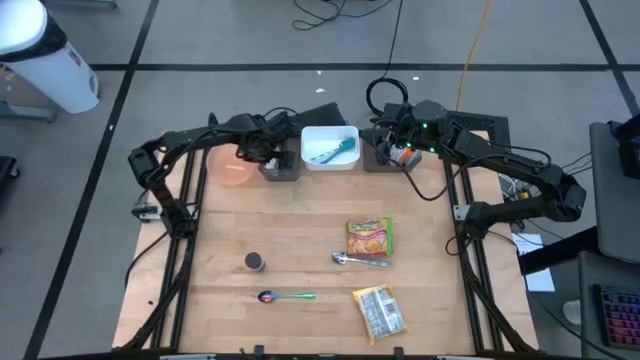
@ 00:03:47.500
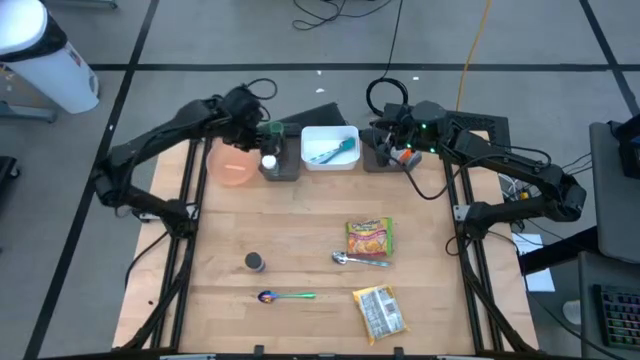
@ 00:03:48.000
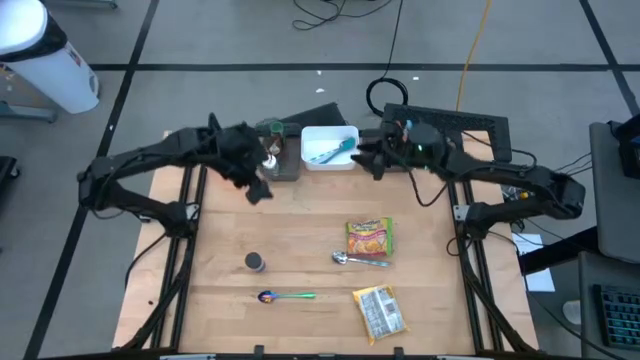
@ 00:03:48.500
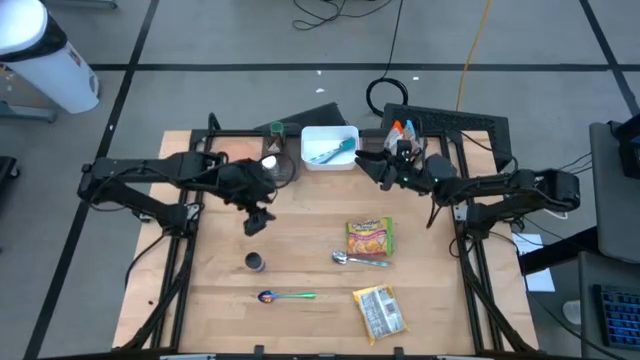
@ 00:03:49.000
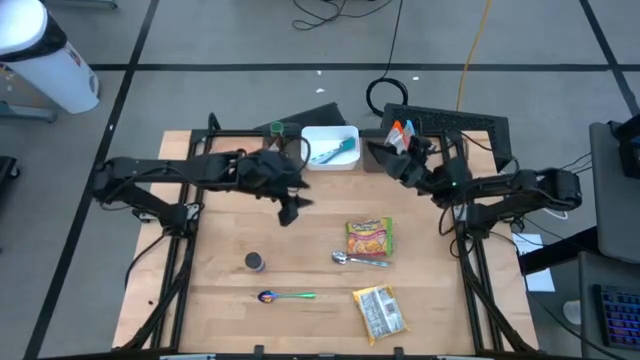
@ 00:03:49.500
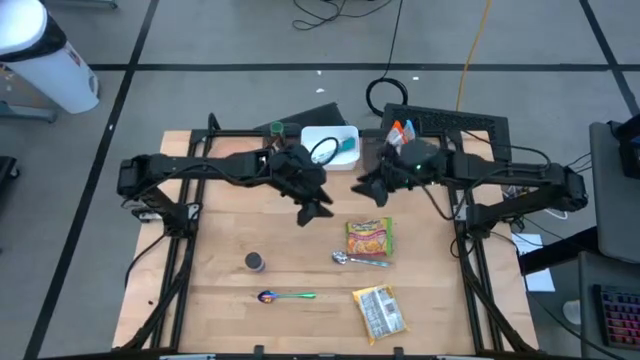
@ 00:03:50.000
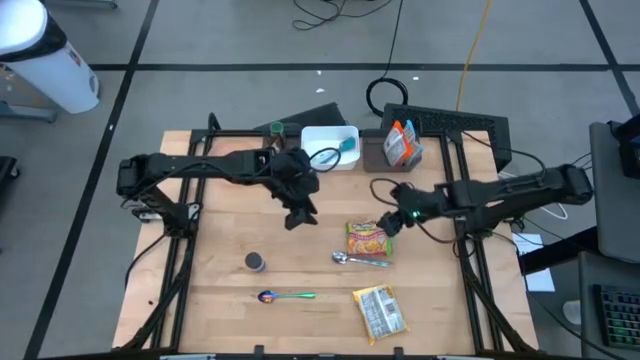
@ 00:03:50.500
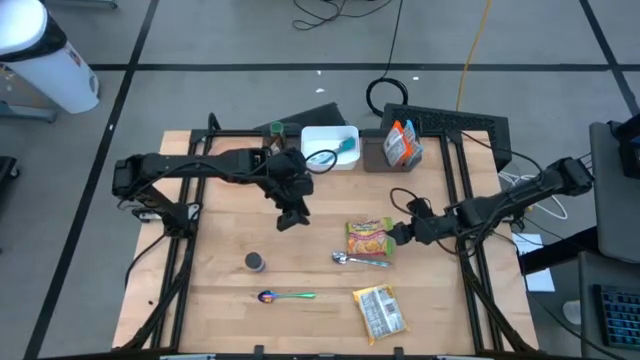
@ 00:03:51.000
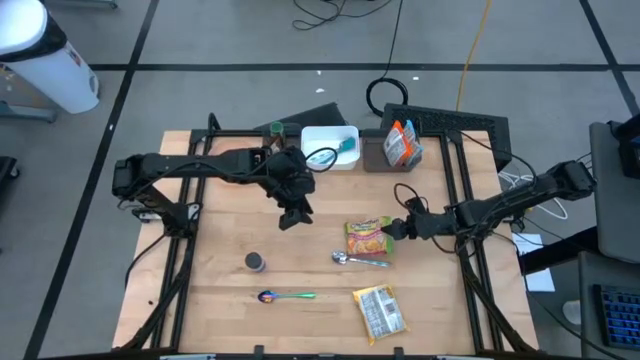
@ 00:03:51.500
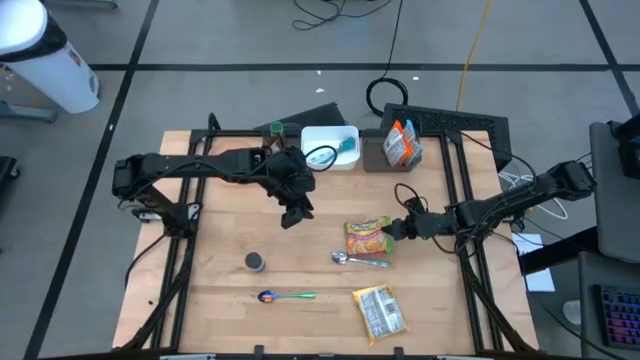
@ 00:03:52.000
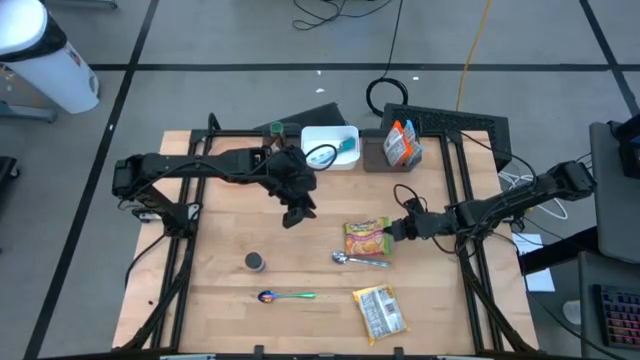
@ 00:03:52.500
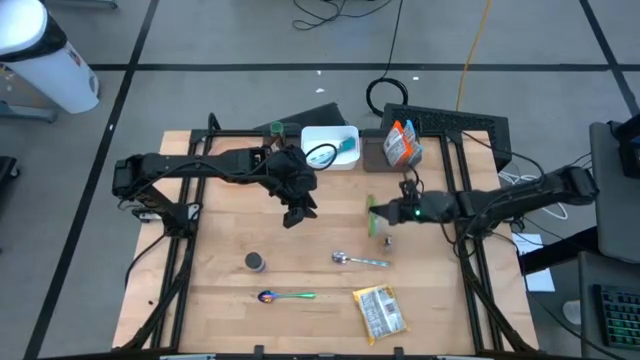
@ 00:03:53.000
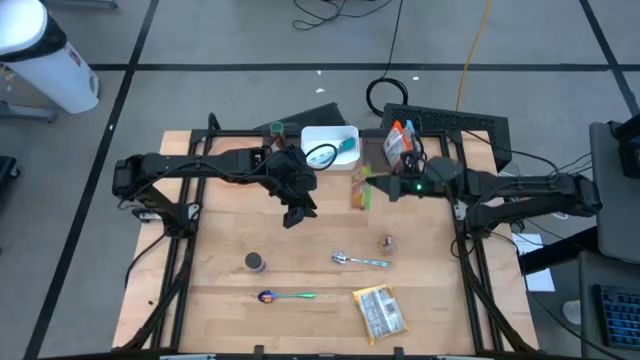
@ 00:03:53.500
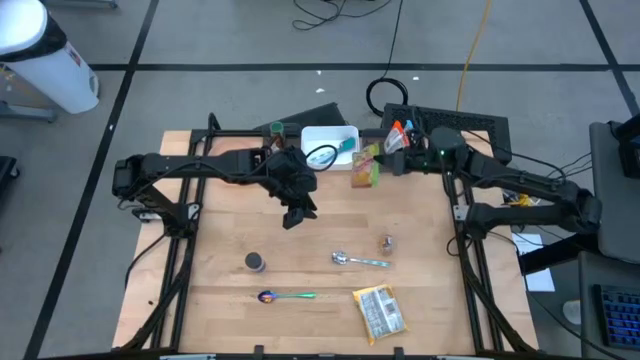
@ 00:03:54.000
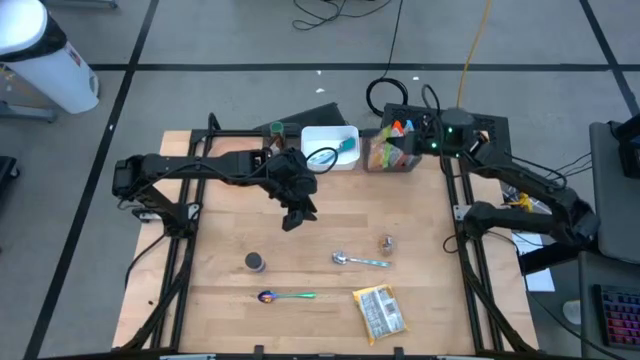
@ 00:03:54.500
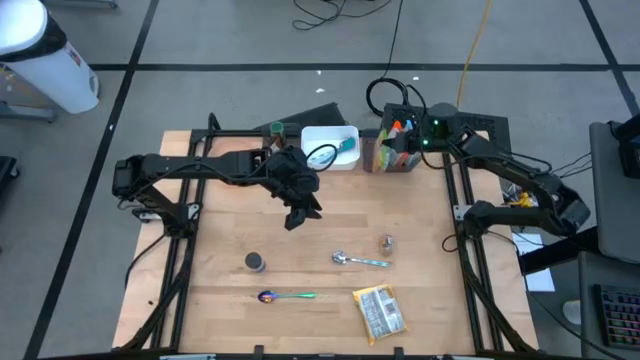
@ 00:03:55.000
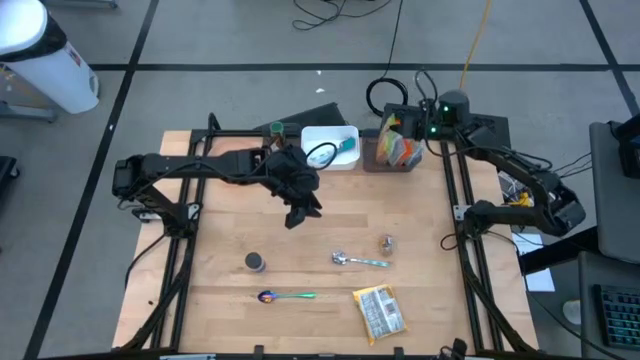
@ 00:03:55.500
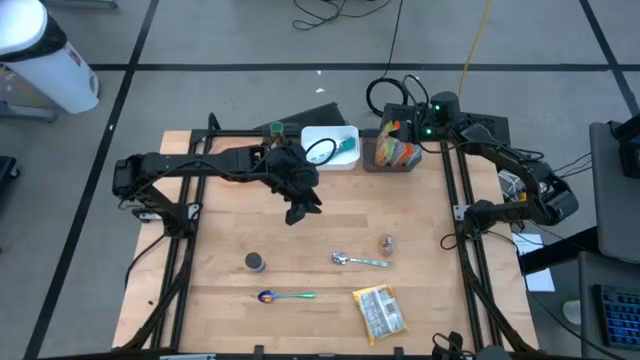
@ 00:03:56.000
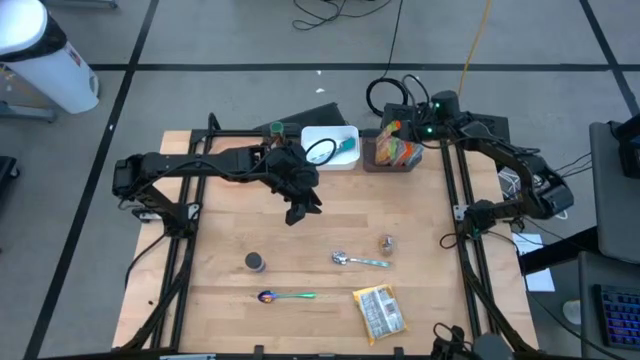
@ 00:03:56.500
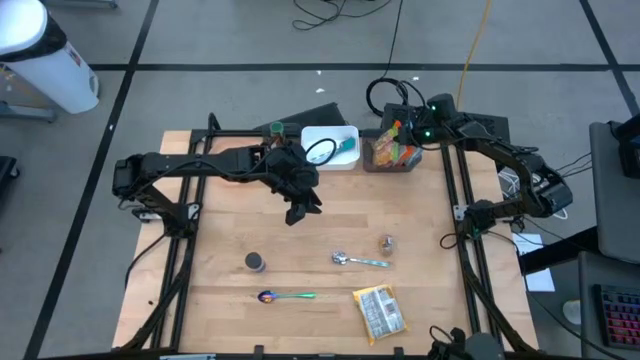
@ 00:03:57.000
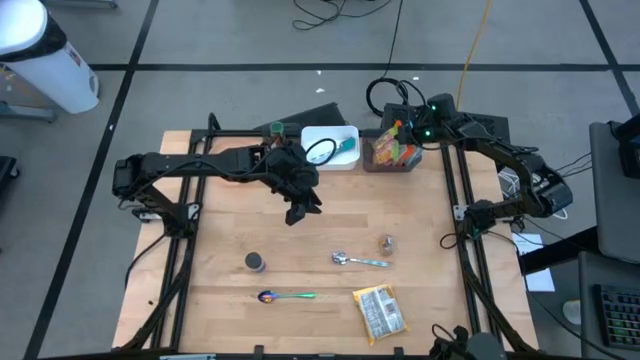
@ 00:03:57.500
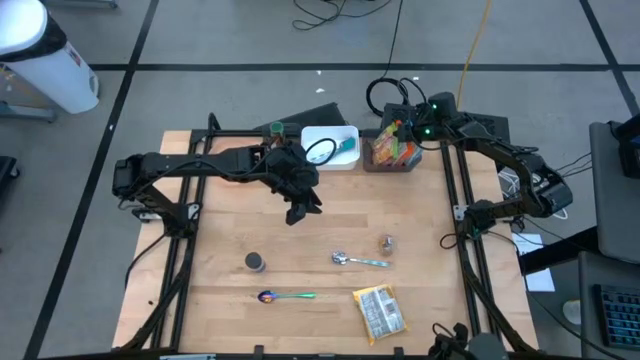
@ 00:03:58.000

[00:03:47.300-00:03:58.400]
Task: Pick & Place Food Item
Put the green noodle pack into the right black bin

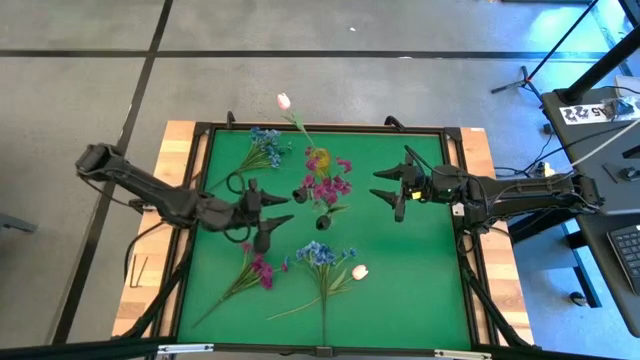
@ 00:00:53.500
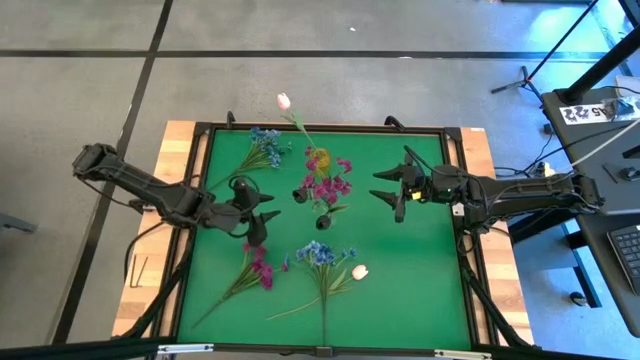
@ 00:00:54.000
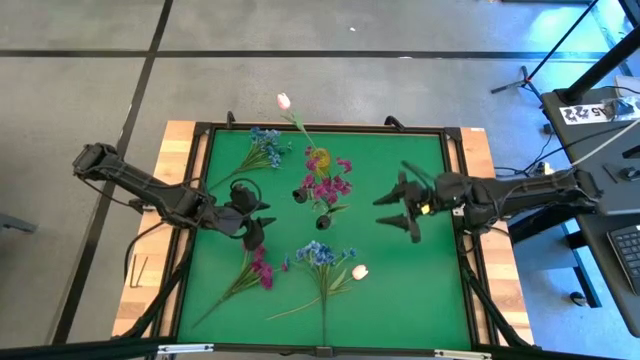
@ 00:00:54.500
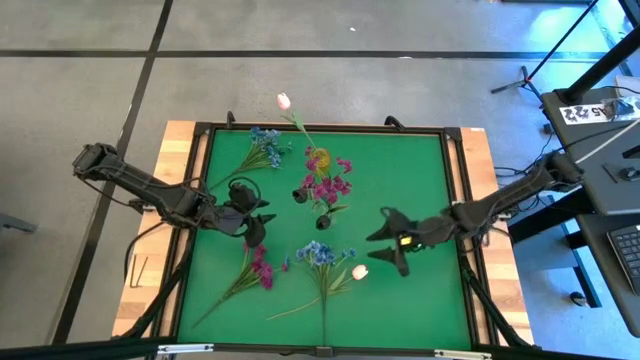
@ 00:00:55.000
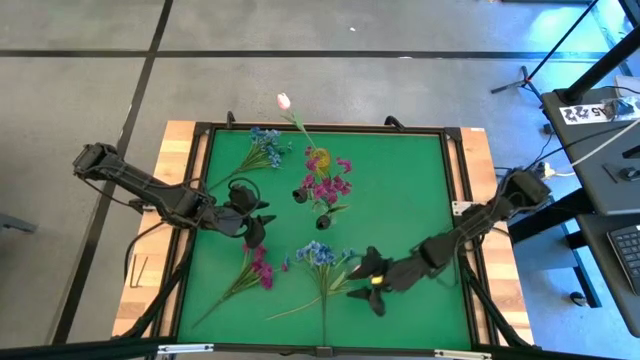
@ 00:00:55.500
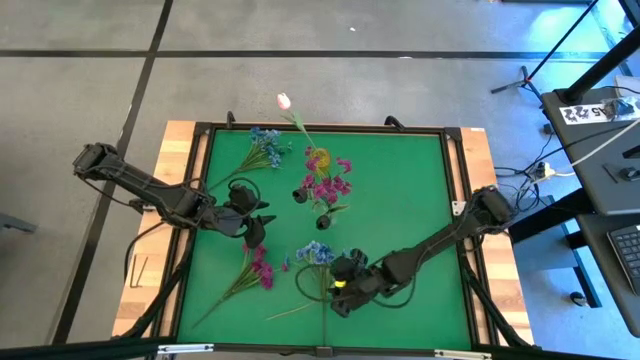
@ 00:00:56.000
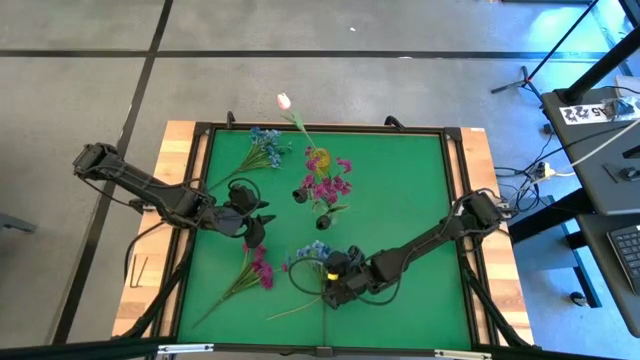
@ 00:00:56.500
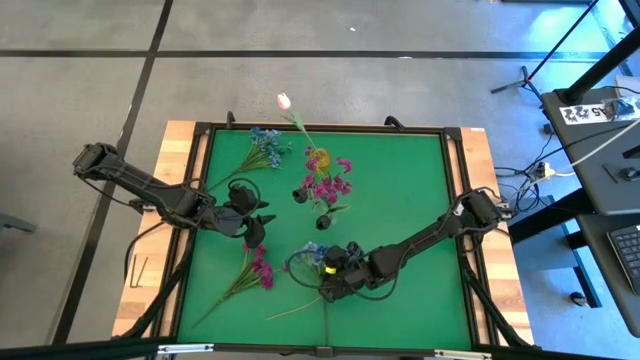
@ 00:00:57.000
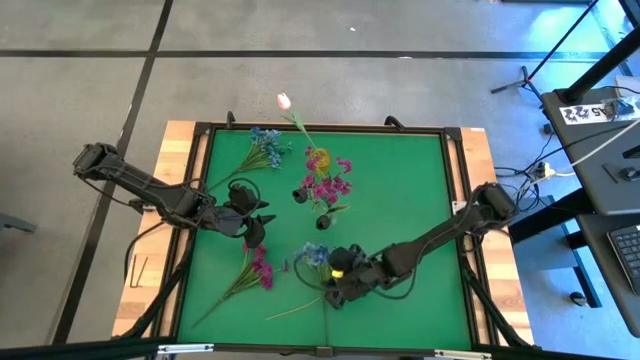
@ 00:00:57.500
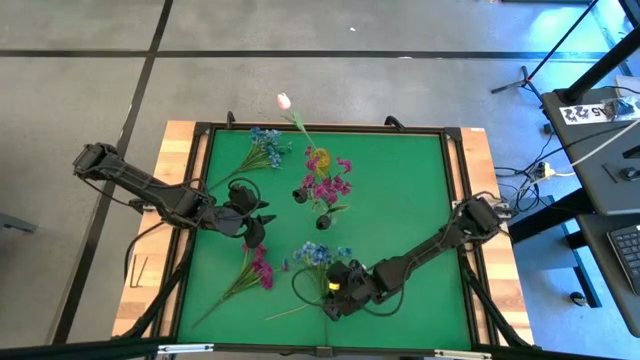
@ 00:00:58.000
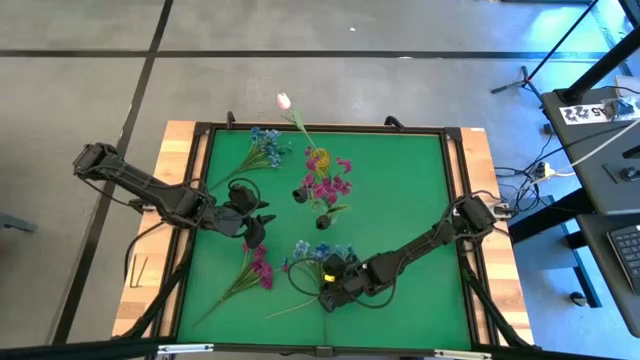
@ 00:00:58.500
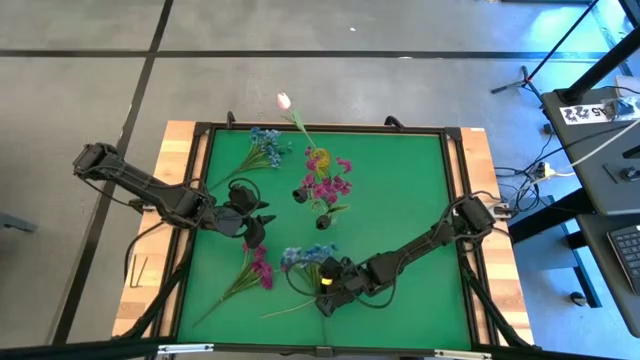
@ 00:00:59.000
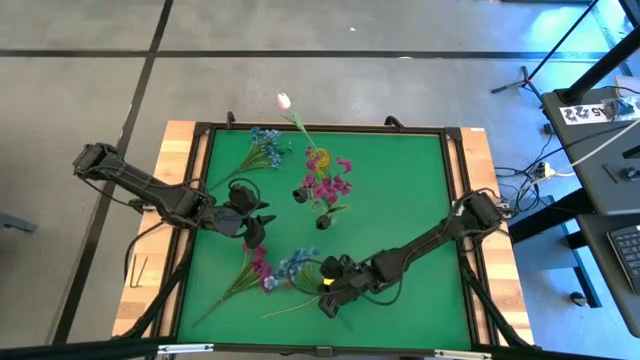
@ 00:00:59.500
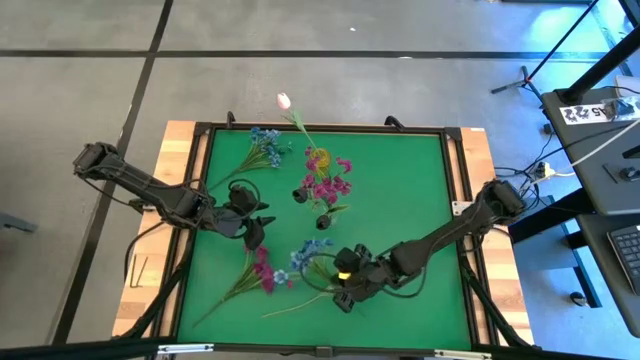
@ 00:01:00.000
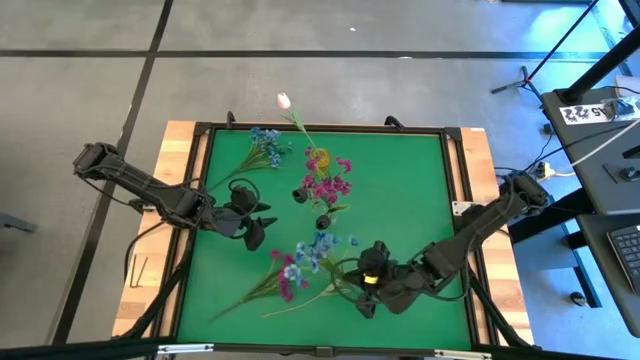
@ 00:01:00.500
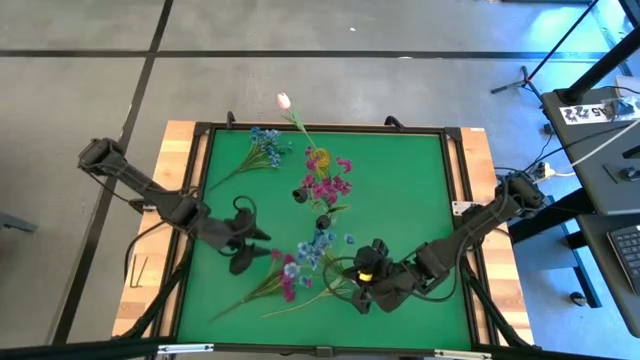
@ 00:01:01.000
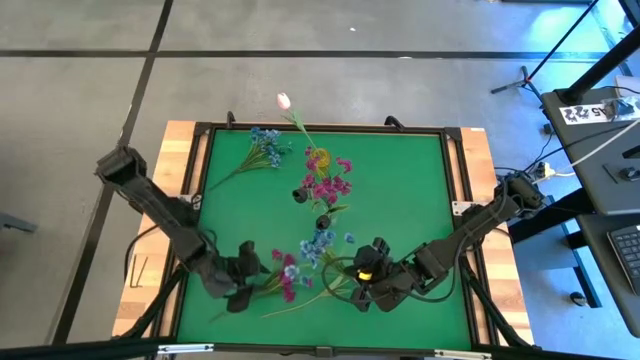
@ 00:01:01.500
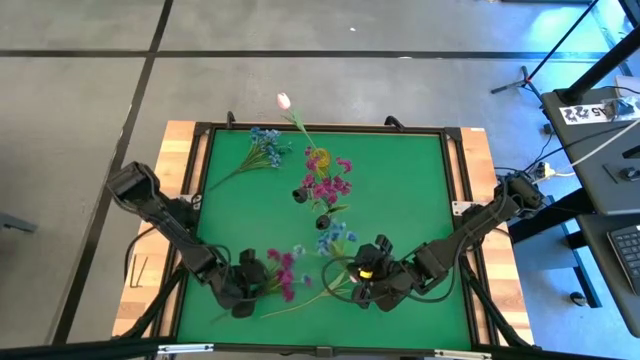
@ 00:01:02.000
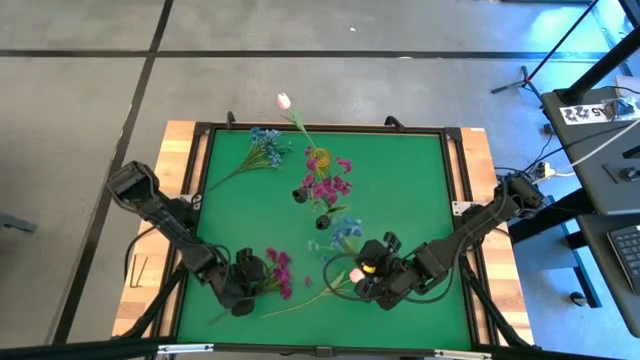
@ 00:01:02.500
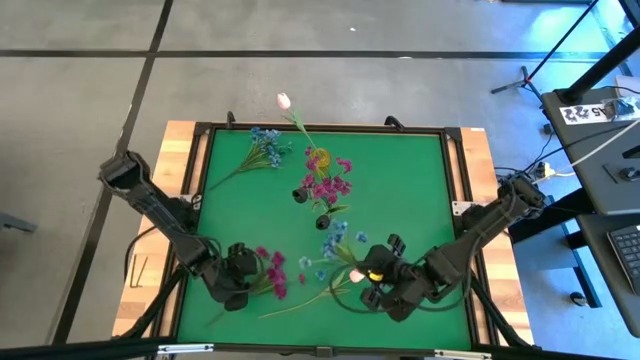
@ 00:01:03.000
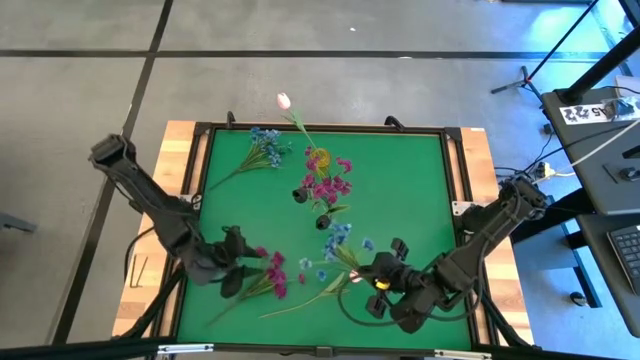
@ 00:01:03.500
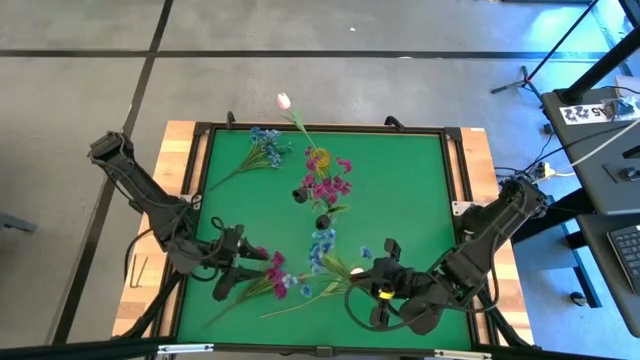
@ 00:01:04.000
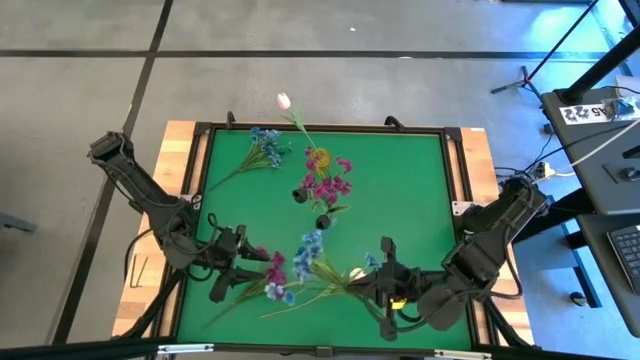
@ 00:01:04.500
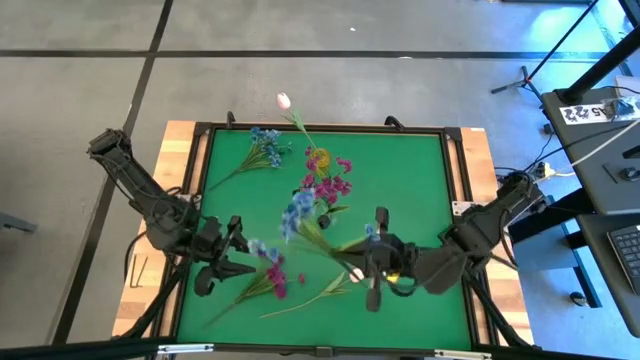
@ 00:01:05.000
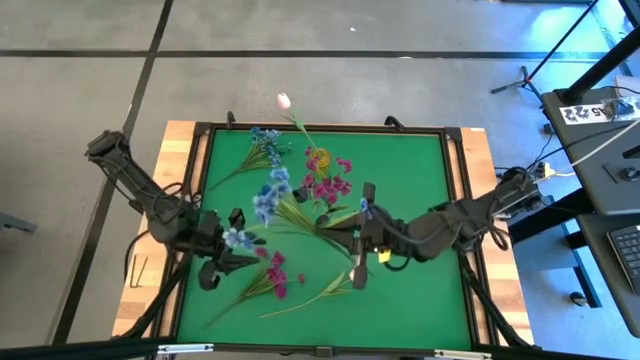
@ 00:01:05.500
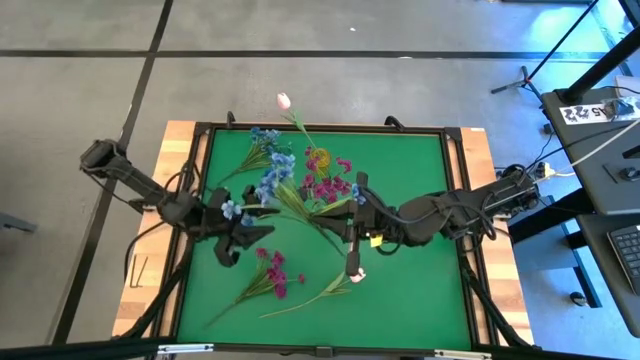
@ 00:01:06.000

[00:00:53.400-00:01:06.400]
Task: Sort flowers into vase by color
Put the bottom blue flowers into the yellow vase
